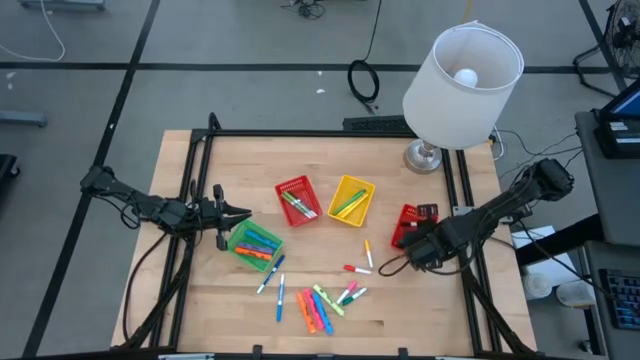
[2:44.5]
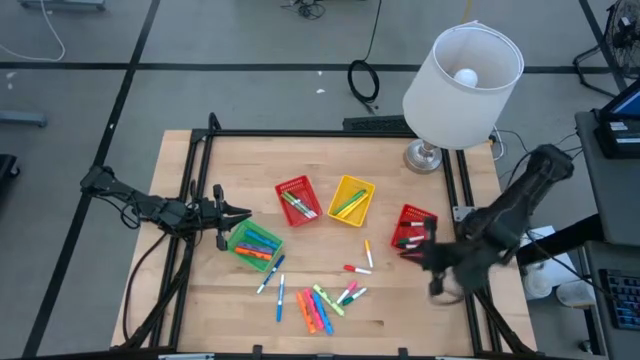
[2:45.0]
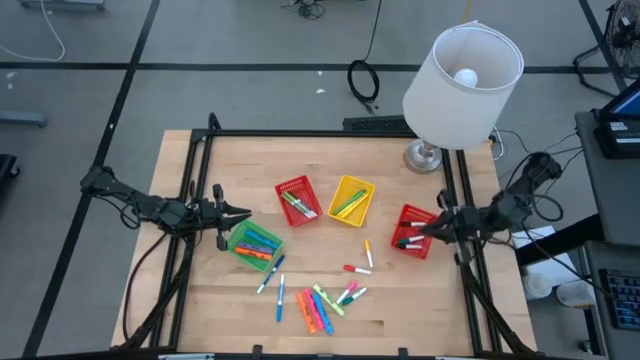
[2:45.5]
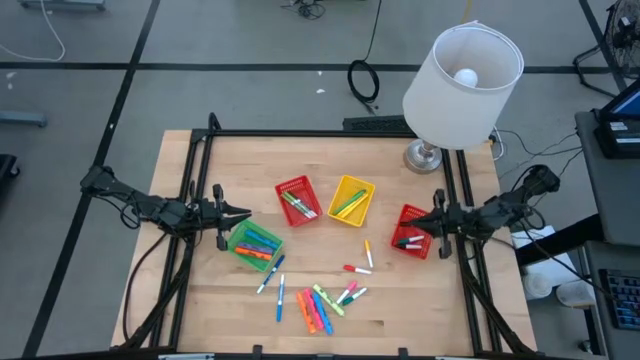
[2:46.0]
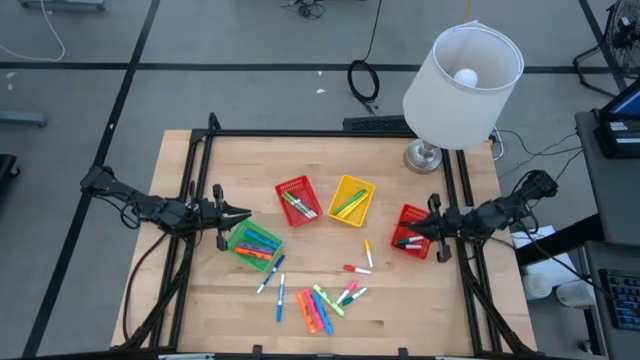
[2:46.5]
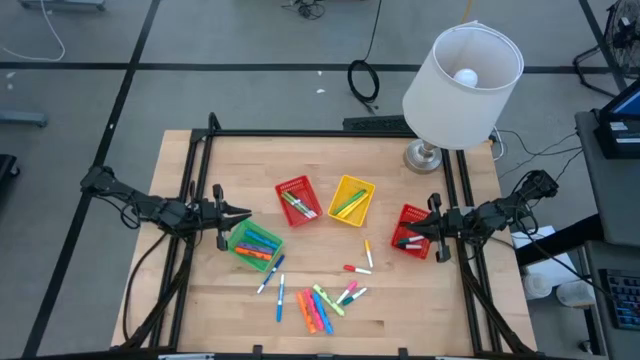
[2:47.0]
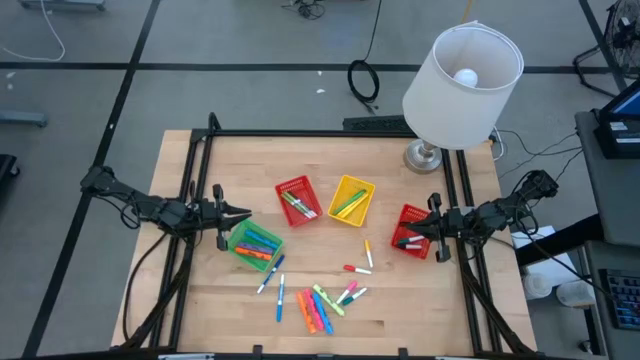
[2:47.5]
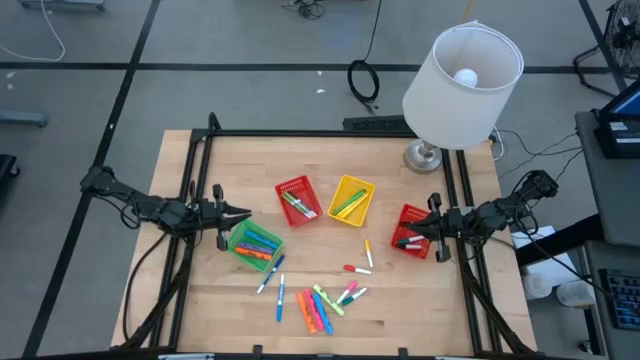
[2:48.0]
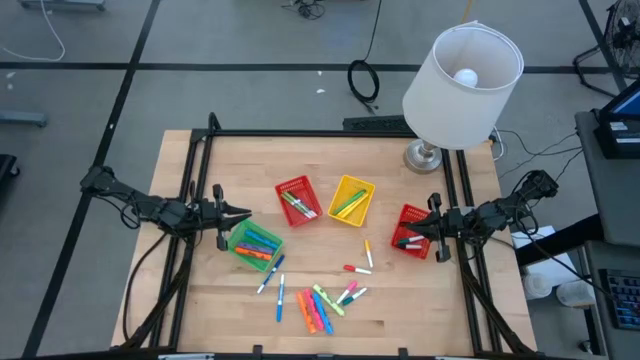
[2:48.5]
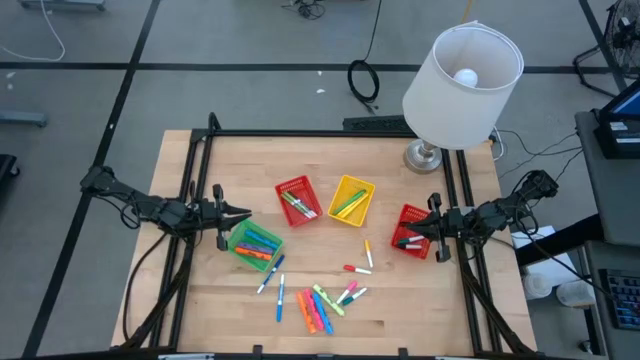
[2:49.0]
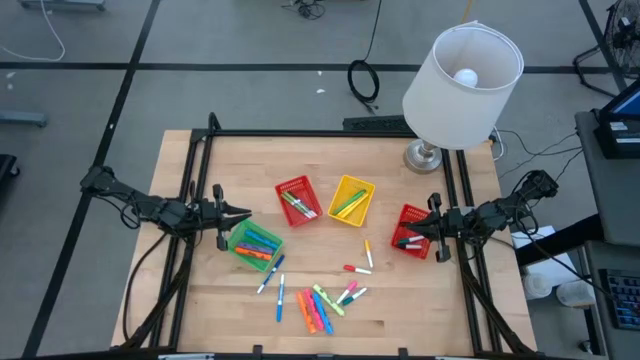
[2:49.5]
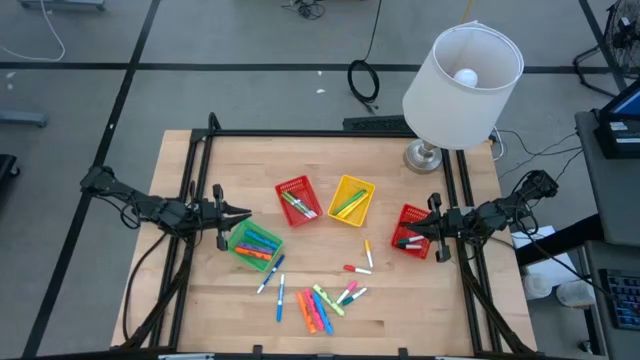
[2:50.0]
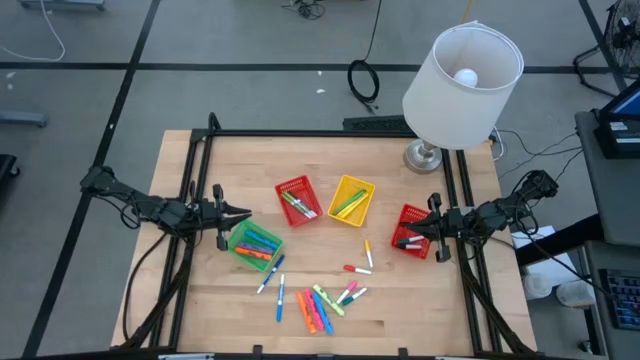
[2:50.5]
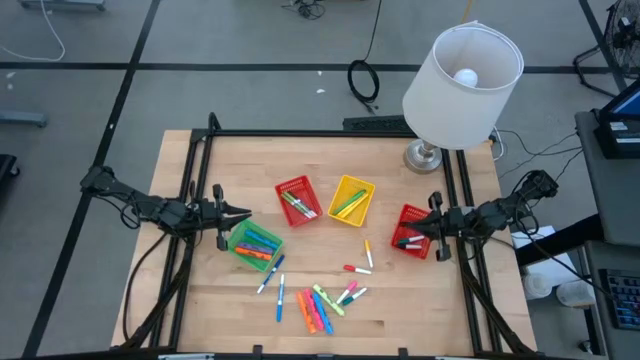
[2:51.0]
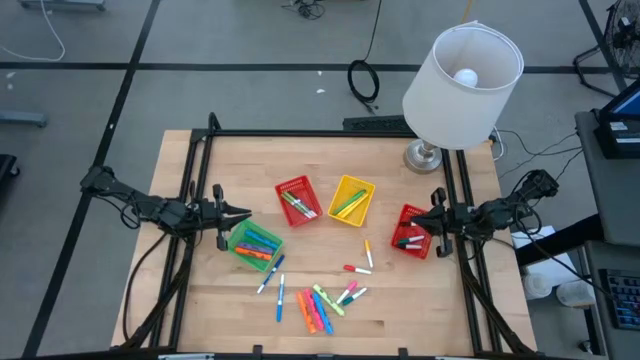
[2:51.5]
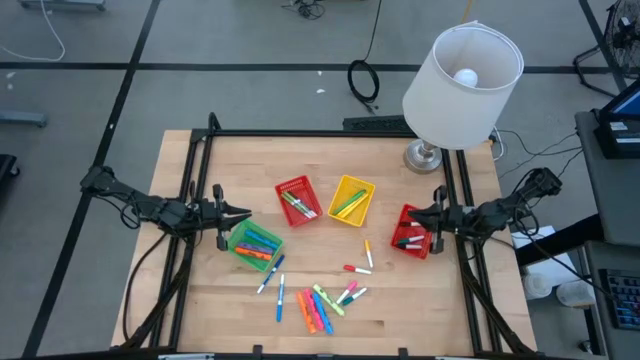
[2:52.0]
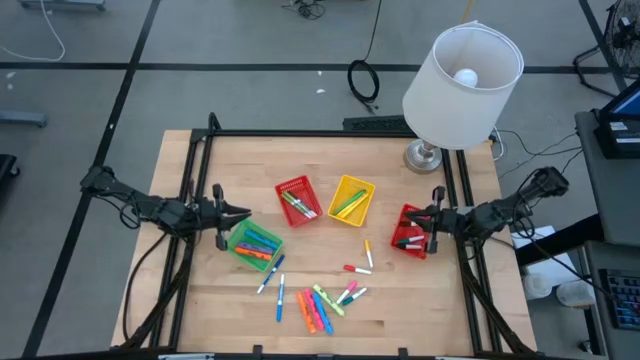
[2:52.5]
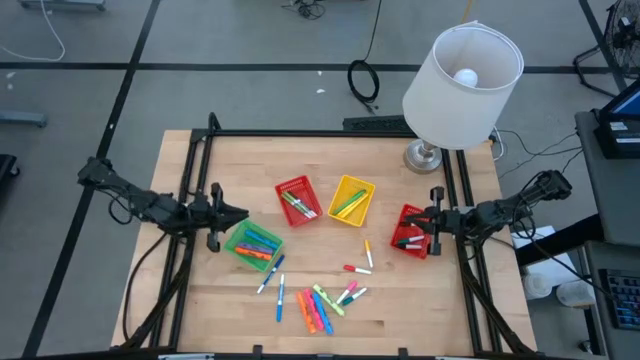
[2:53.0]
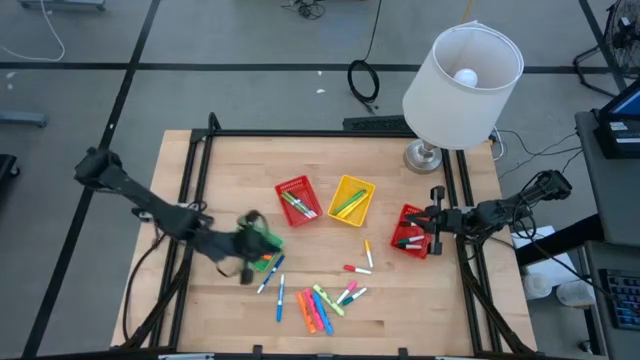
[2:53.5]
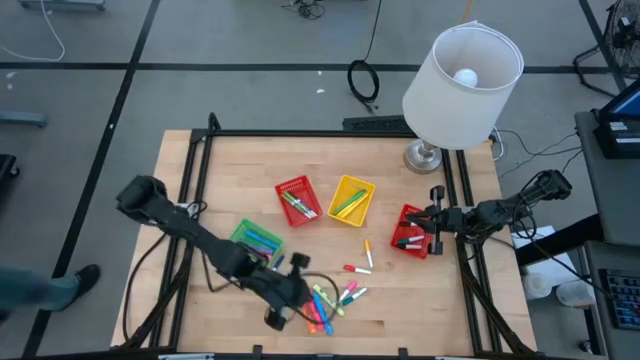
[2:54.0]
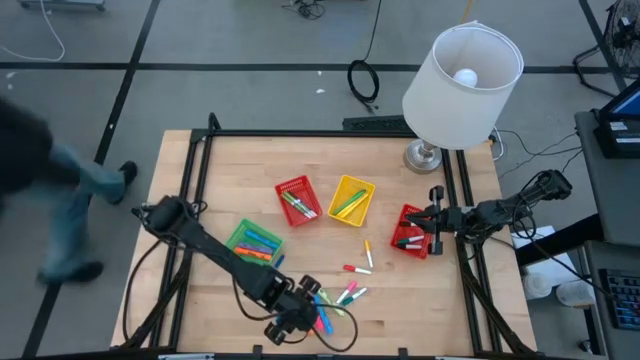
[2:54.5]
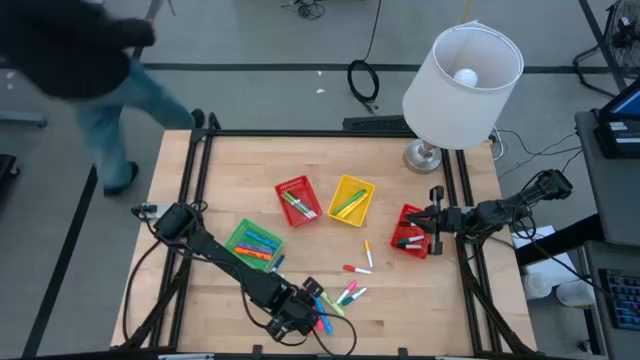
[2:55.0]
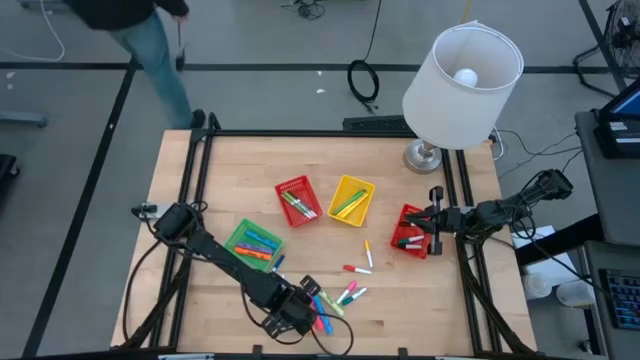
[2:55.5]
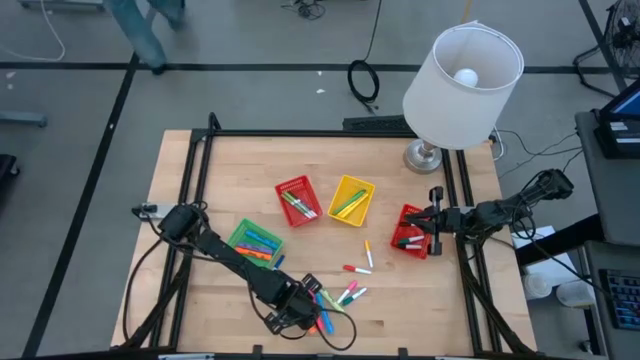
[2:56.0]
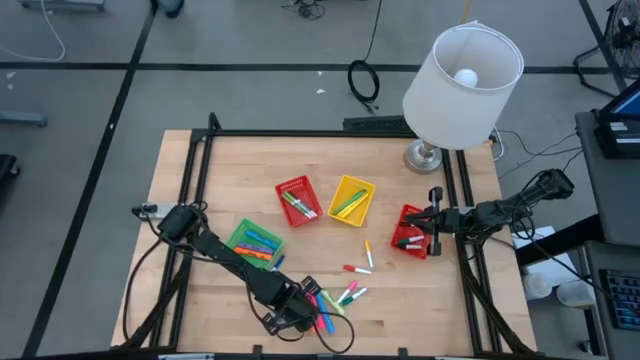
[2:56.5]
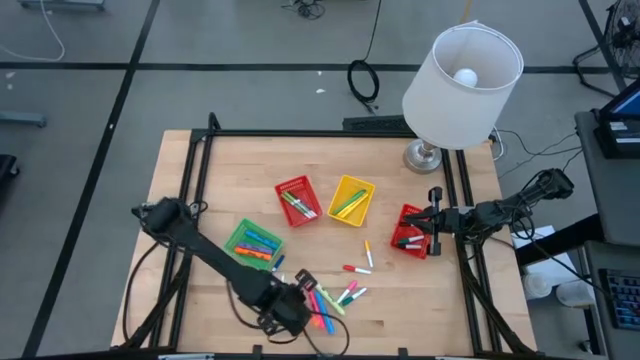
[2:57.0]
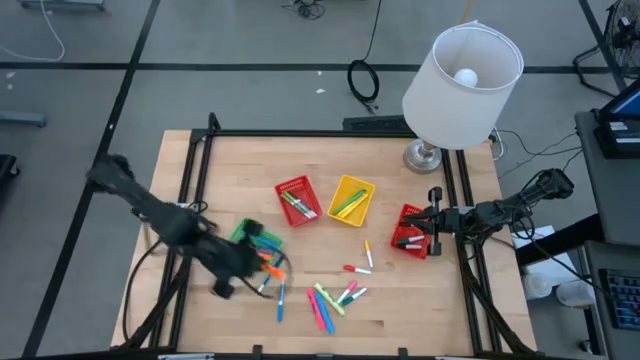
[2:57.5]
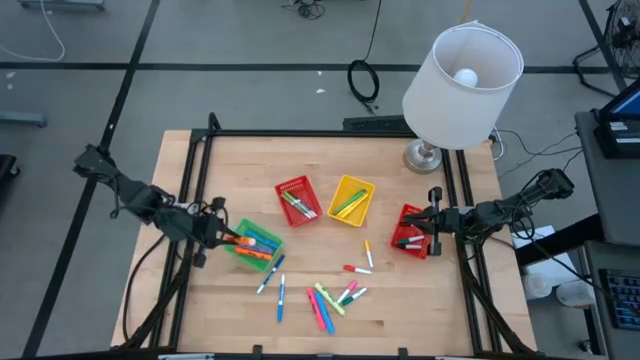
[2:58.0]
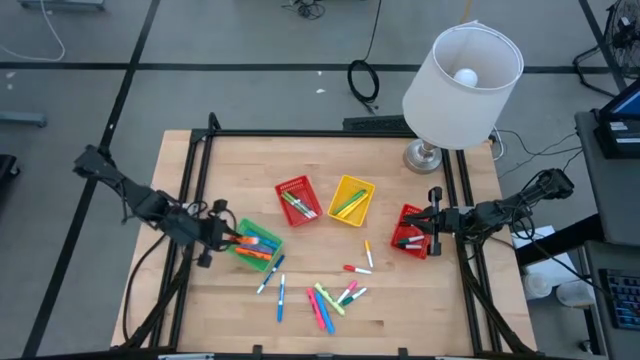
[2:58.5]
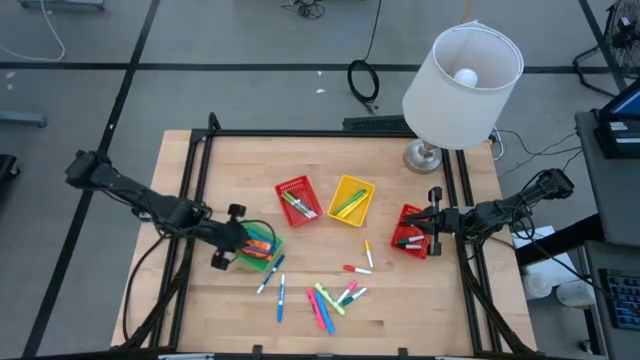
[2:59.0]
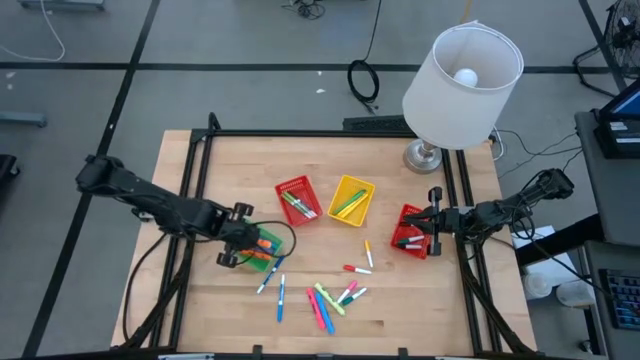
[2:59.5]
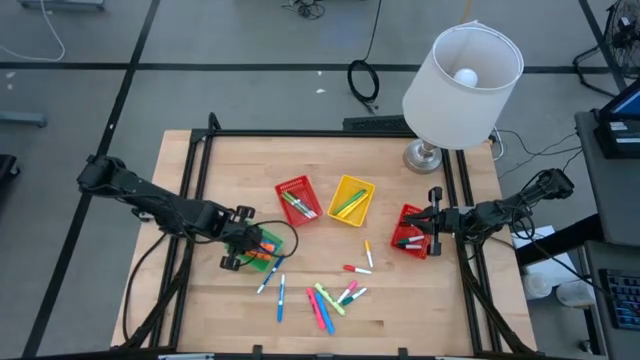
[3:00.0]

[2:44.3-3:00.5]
Task: Pick & Place Markers
Put the orange highlighter into the green bin

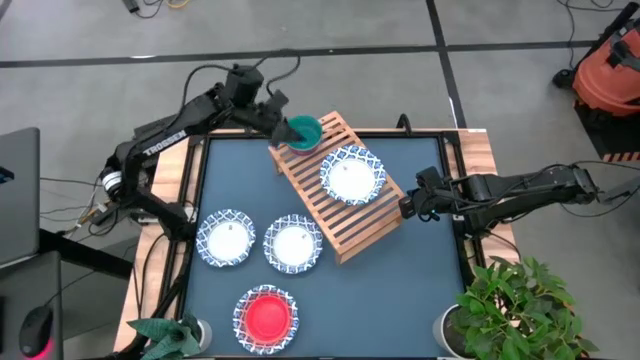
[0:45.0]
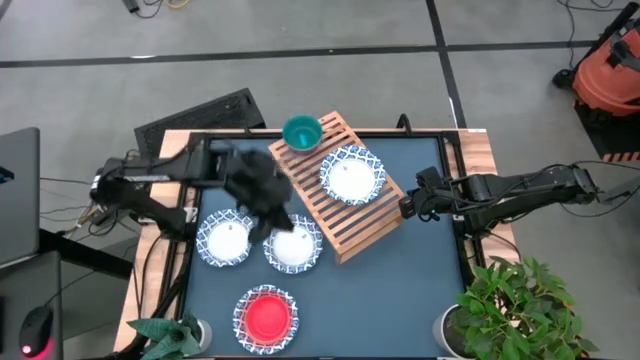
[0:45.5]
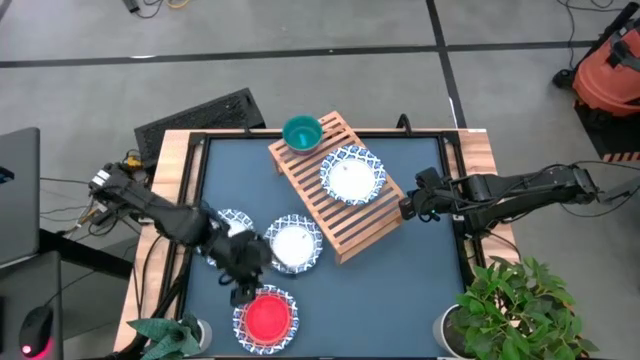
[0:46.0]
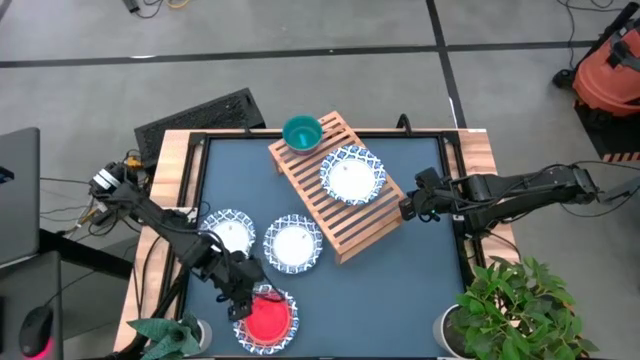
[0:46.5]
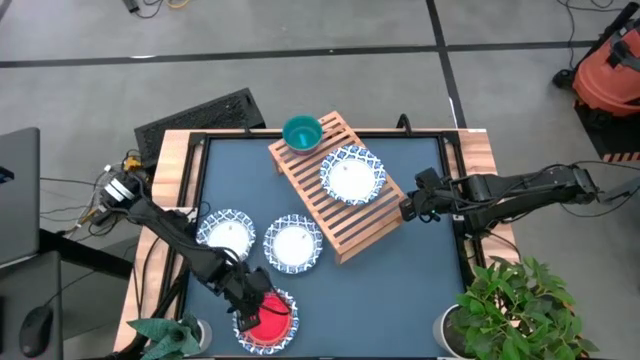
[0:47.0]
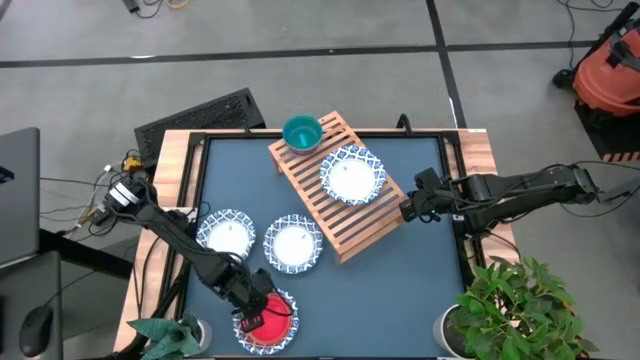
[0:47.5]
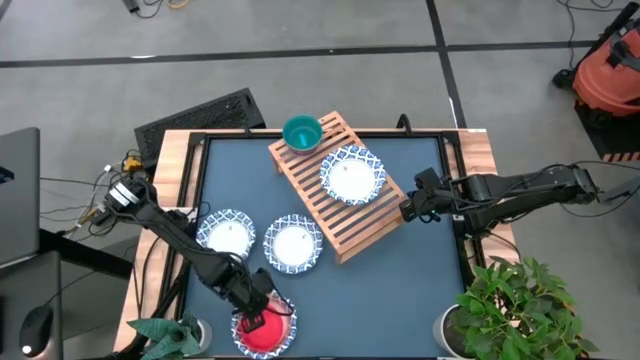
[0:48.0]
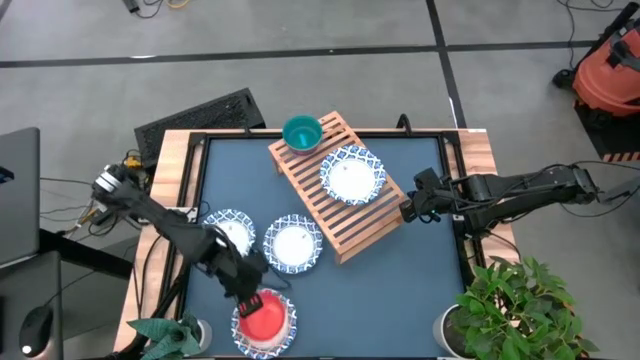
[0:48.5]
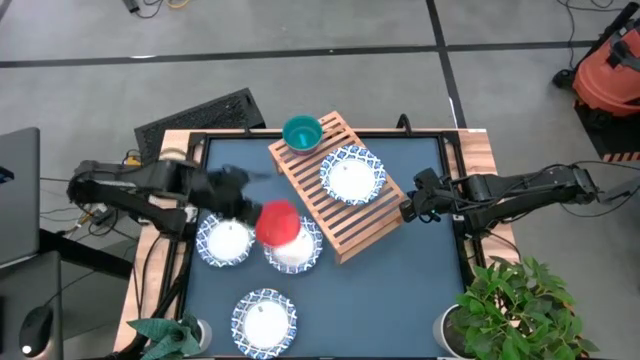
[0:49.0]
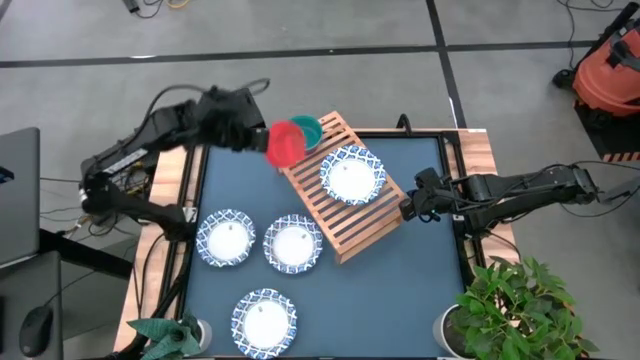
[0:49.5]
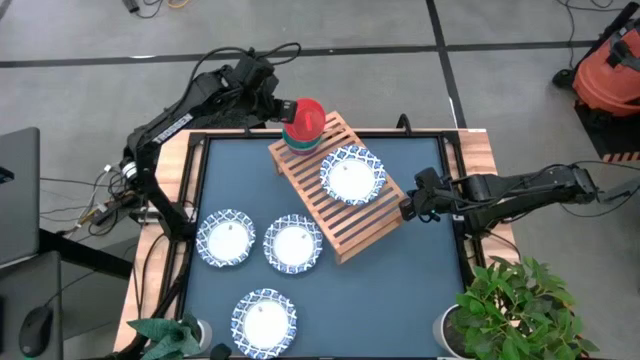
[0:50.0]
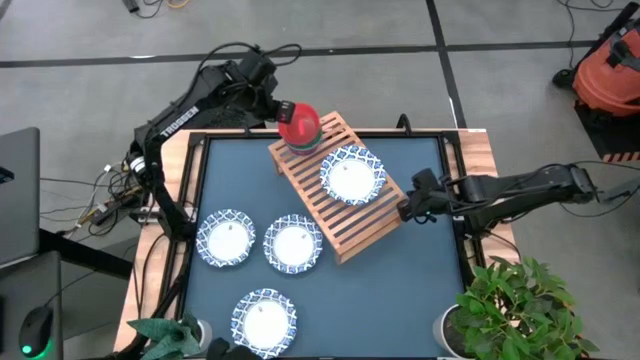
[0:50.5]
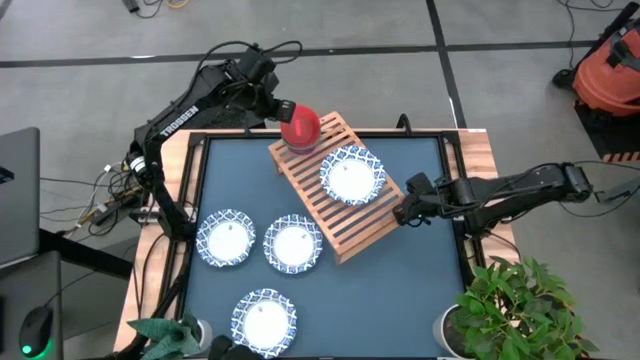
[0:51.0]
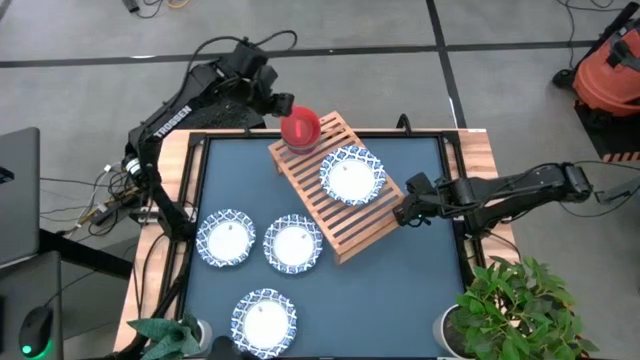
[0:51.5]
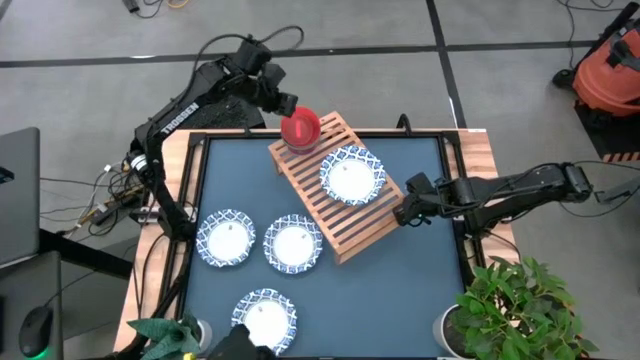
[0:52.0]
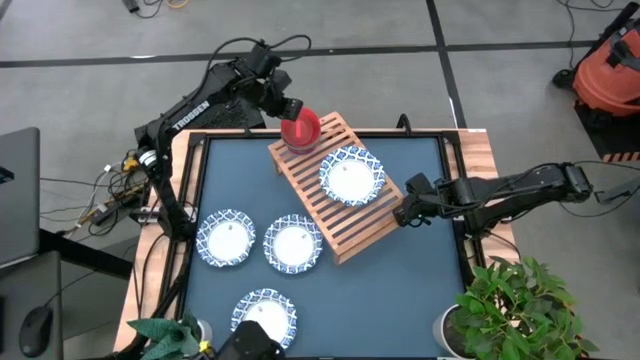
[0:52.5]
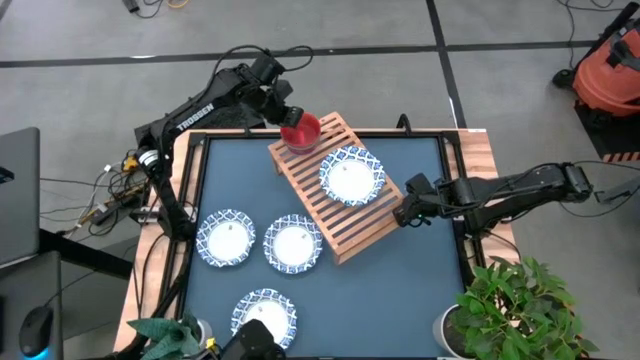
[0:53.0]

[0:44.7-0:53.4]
Task: Place and stack bowls onto a shelf
Stack the orange bowl on top of the blue bowl on the shelf
